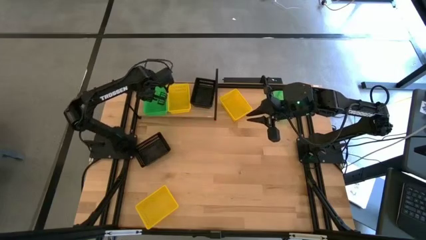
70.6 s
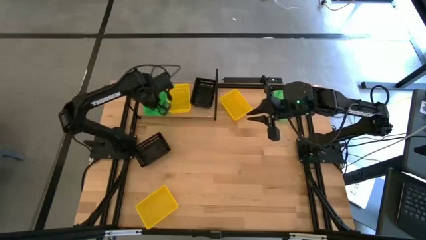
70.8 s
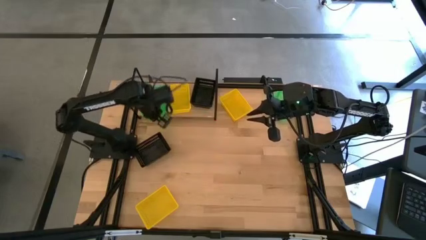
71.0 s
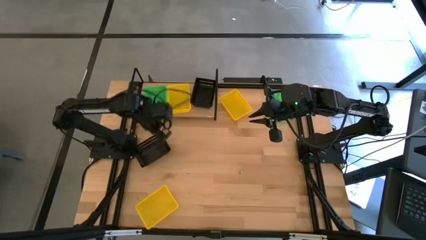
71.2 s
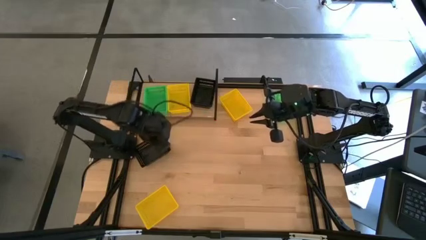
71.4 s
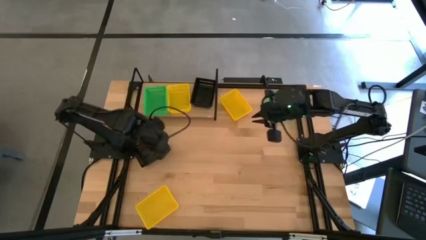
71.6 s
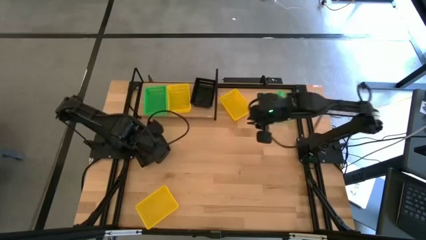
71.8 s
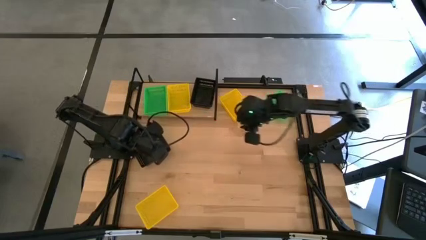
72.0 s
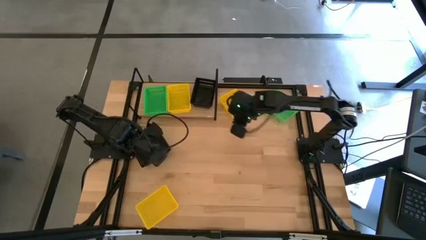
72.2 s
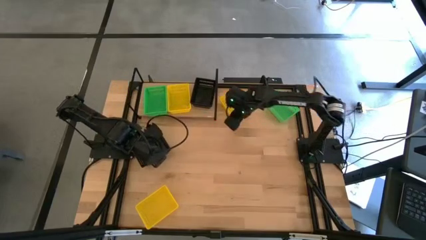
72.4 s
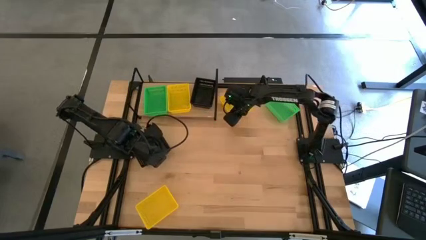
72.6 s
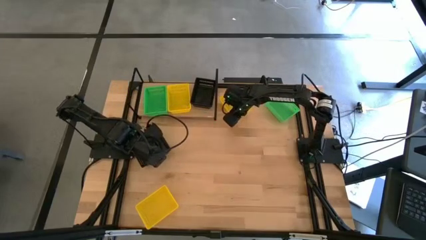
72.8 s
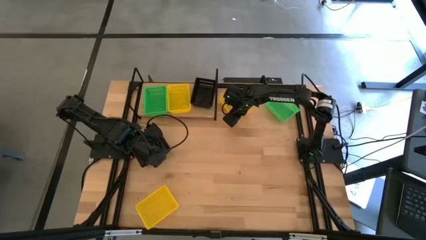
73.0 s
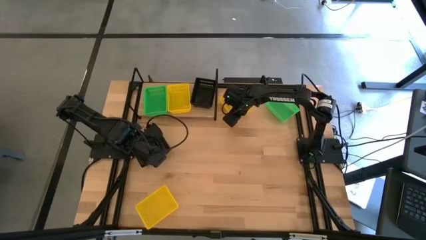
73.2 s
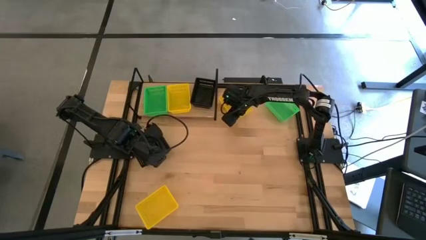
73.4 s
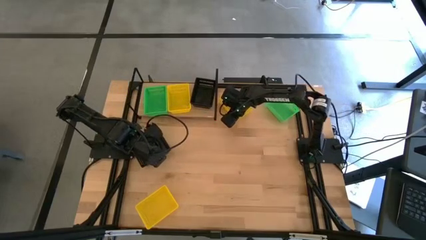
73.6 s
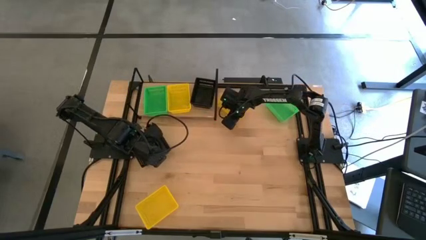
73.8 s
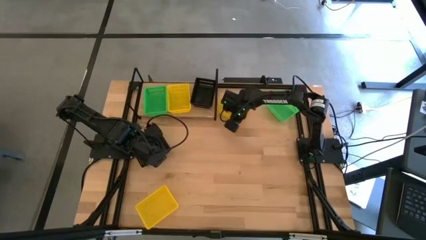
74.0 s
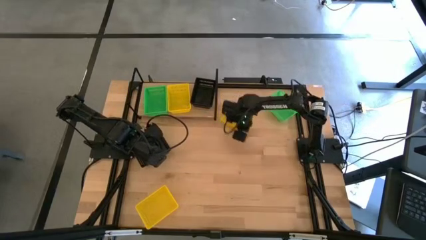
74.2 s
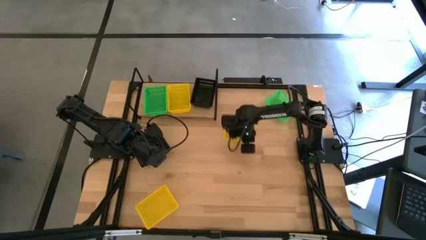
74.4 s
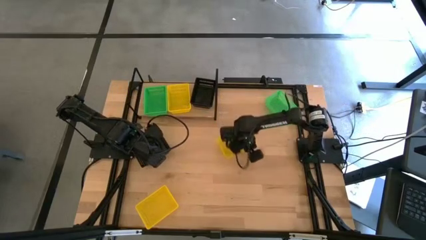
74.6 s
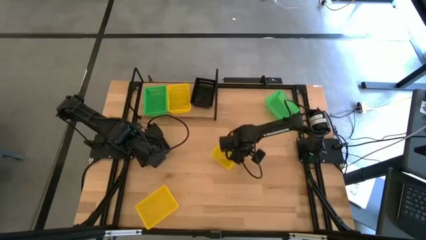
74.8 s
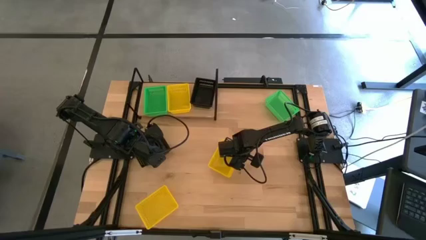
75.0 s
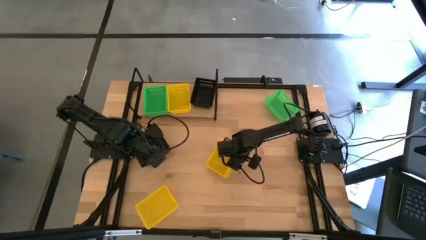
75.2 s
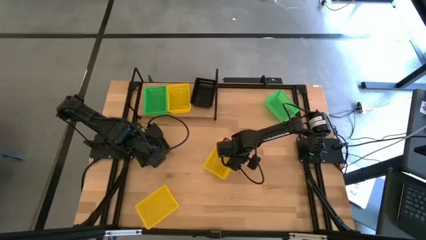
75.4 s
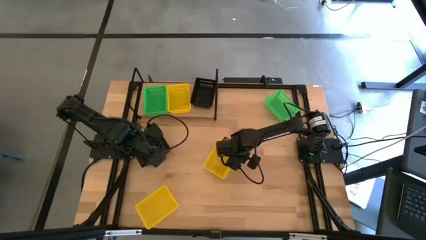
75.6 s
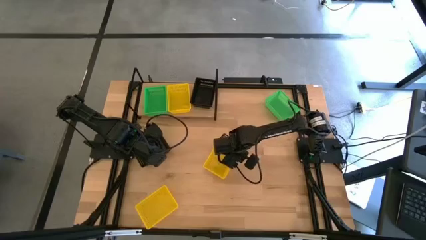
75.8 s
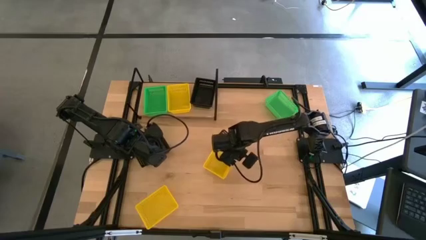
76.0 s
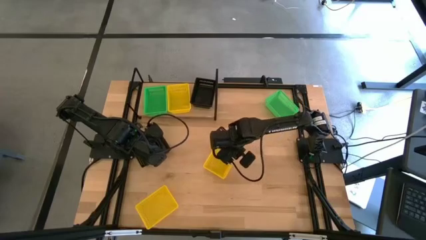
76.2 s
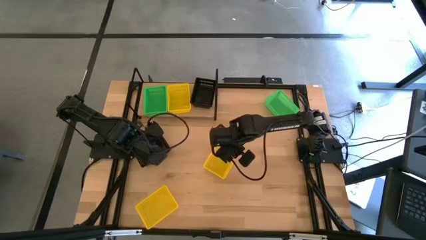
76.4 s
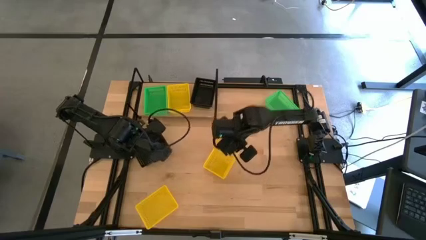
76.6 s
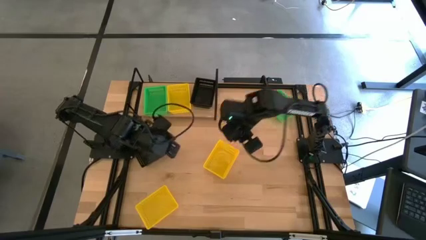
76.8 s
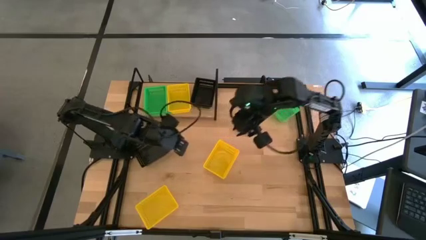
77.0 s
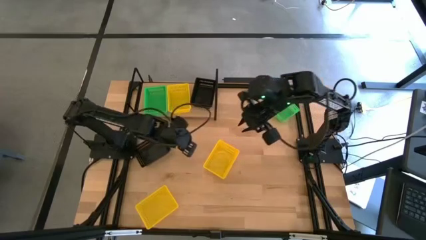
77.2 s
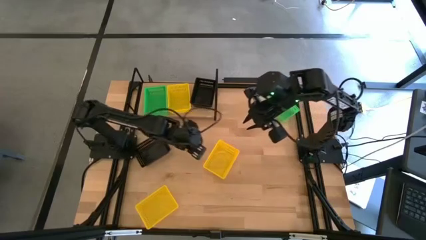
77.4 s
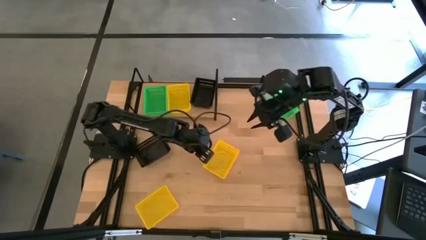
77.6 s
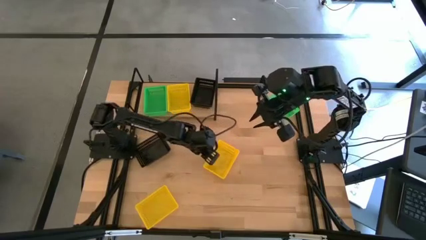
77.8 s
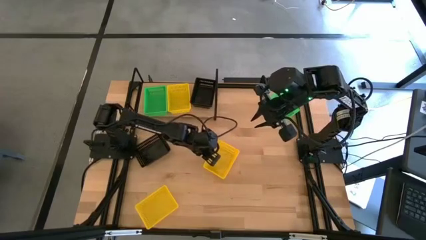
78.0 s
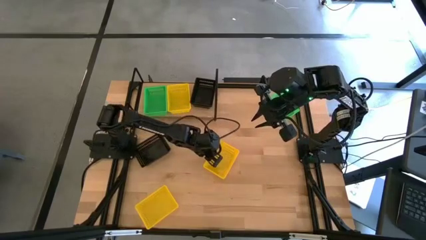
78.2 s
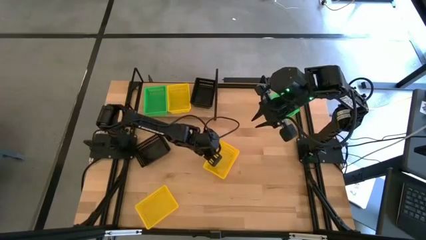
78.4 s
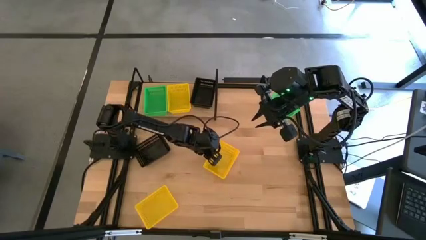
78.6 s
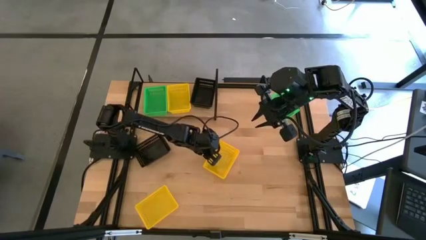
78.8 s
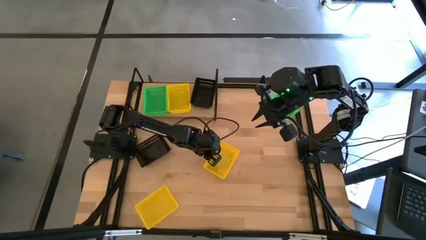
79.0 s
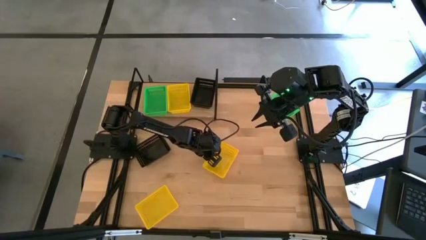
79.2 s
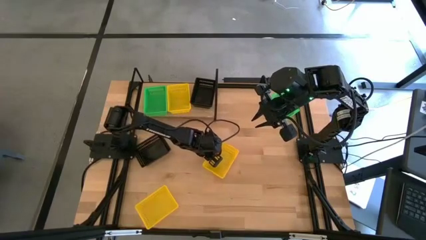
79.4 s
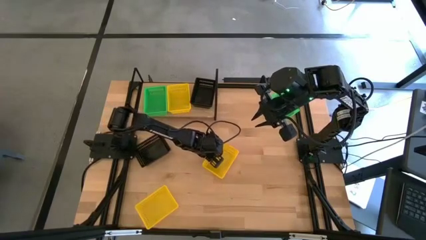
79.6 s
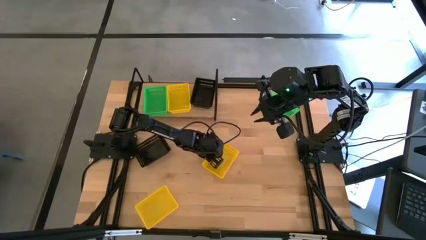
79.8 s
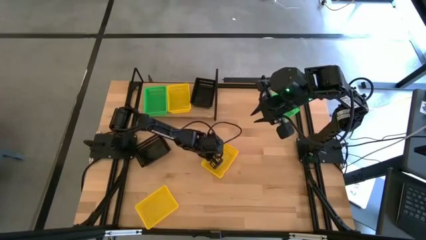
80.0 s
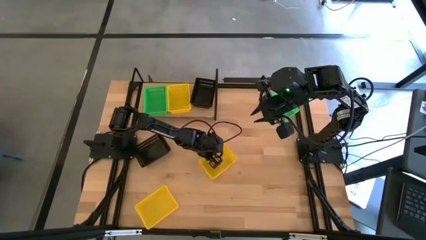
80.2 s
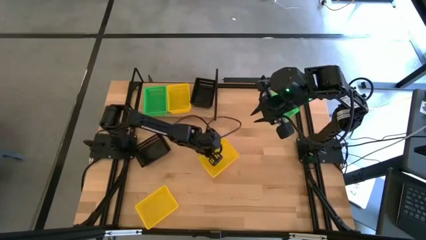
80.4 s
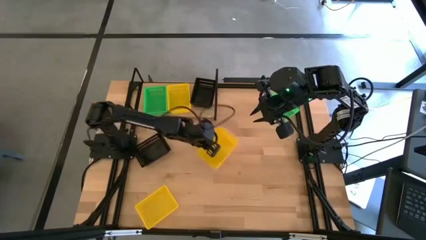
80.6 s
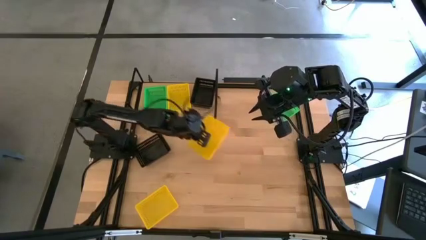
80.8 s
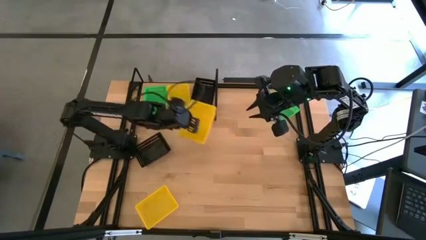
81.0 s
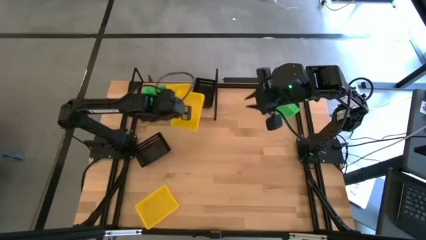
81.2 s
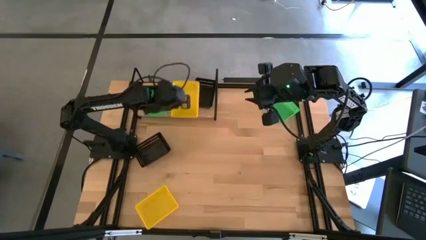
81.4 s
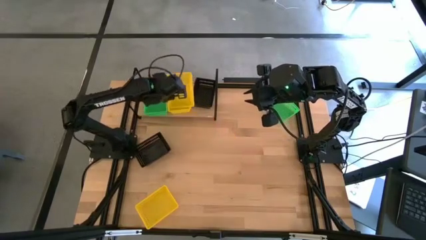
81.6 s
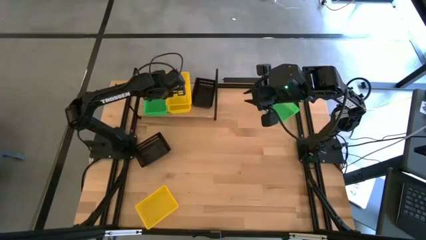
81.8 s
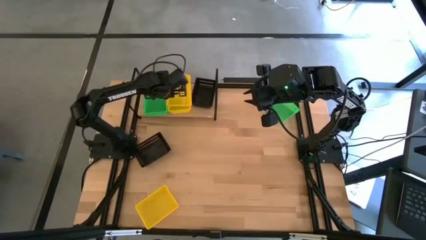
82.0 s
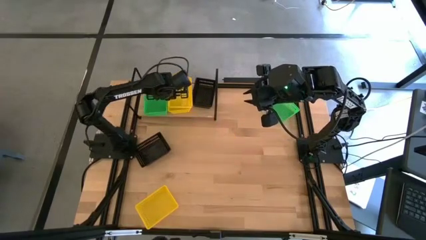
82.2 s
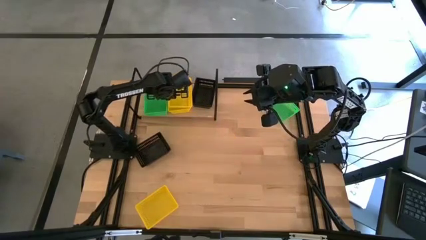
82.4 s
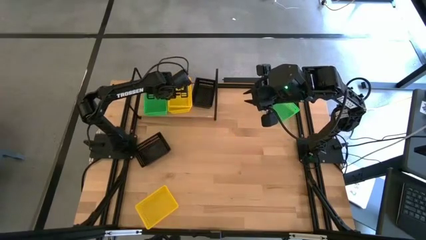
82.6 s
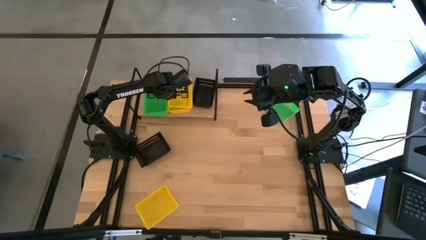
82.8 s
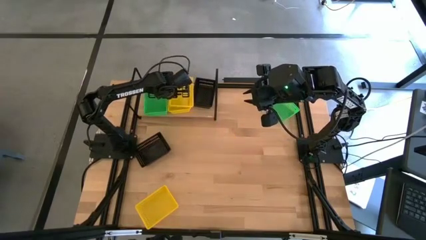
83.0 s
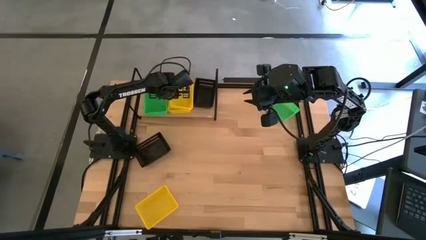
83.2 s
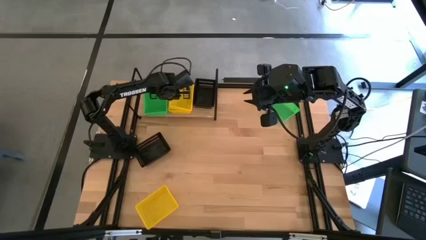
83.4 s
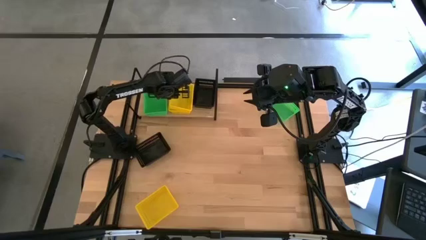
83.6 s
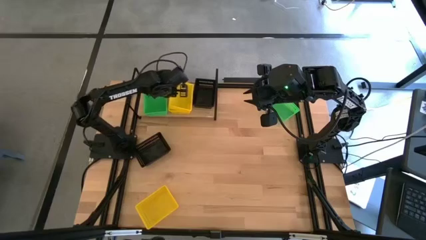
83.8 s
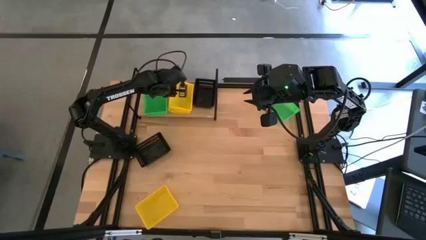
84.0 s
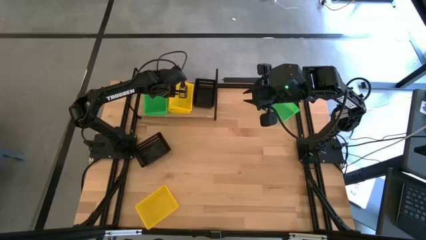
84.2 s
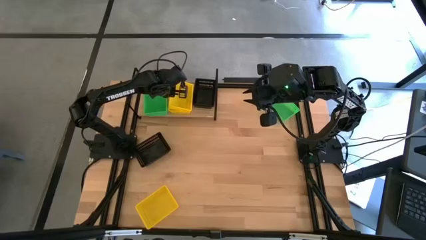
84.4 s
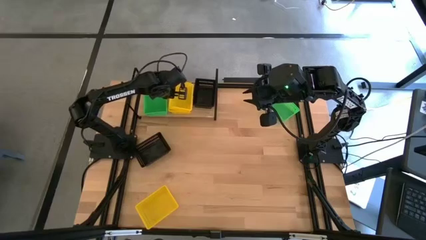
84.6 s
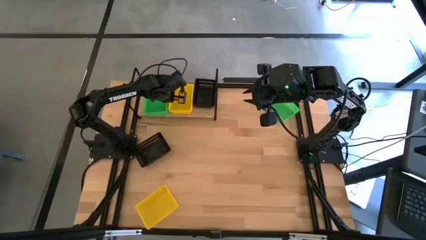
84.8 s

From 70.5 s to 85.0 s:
Task: Stack baskets on shelf by color
Stack the top yellow basket on the yellow basket on the shelf
